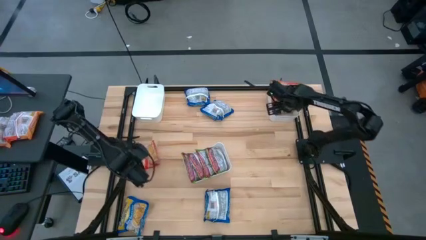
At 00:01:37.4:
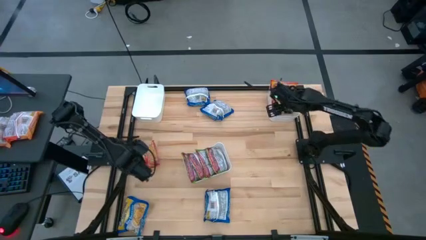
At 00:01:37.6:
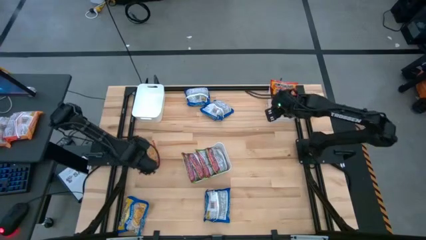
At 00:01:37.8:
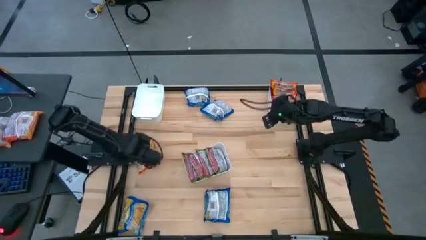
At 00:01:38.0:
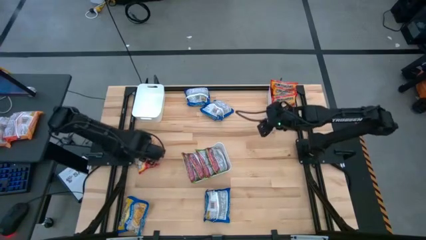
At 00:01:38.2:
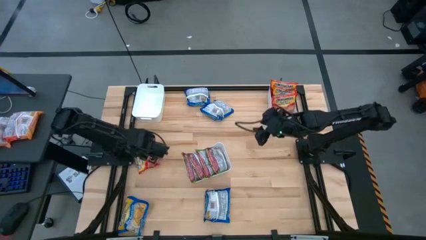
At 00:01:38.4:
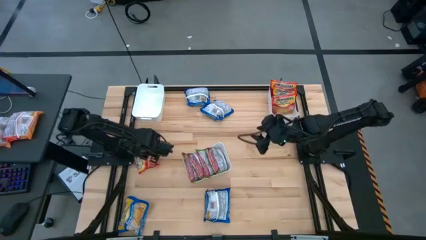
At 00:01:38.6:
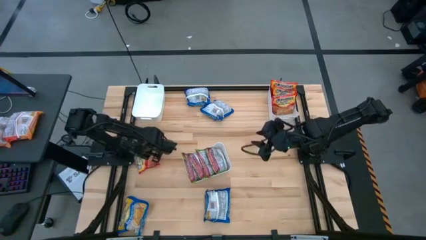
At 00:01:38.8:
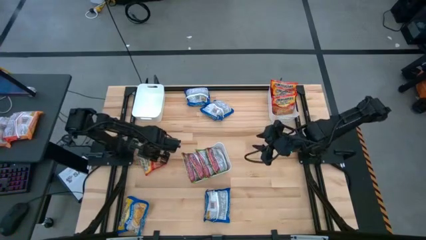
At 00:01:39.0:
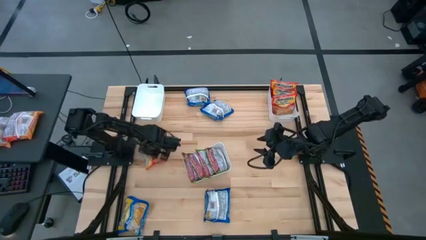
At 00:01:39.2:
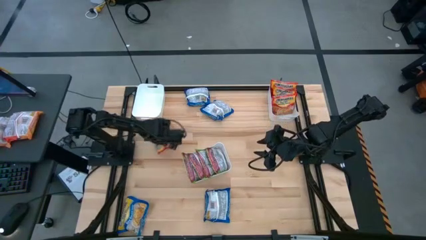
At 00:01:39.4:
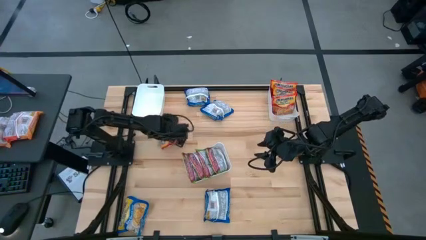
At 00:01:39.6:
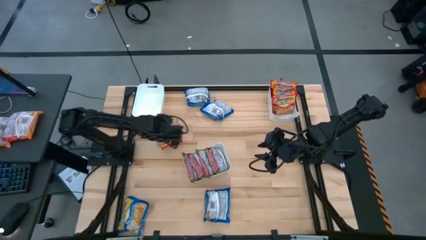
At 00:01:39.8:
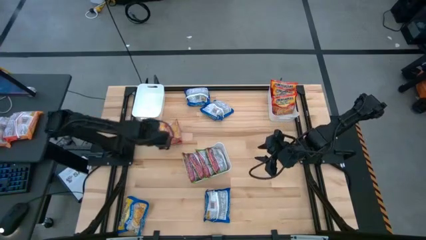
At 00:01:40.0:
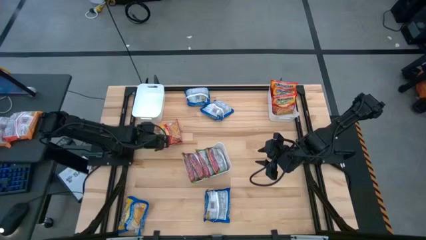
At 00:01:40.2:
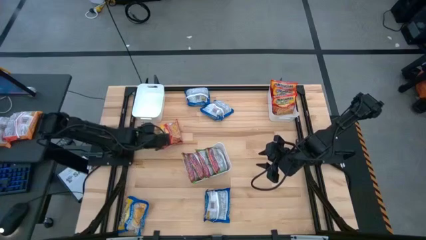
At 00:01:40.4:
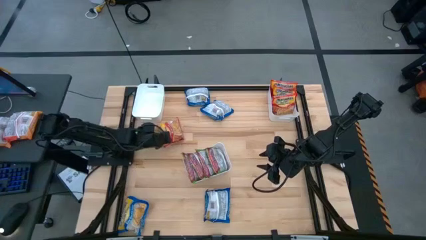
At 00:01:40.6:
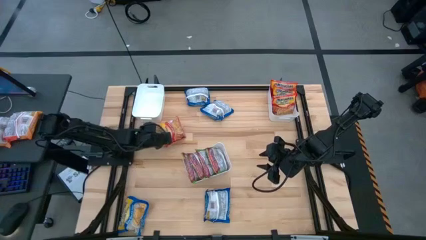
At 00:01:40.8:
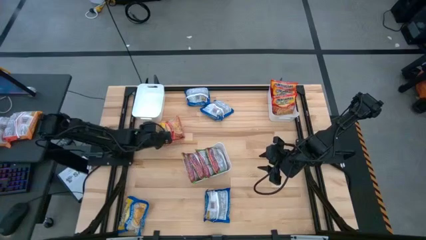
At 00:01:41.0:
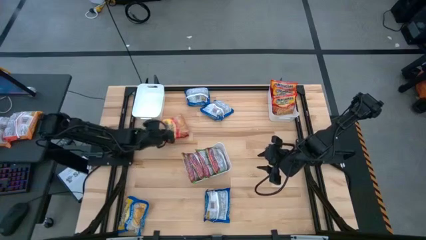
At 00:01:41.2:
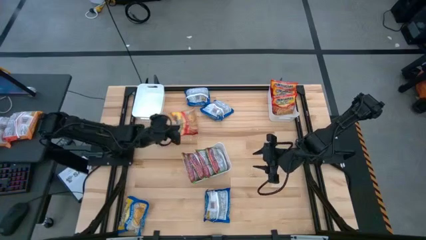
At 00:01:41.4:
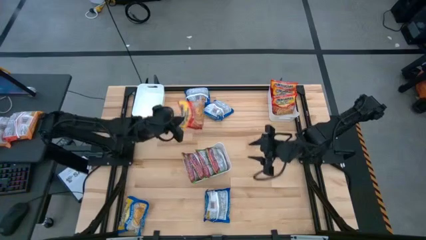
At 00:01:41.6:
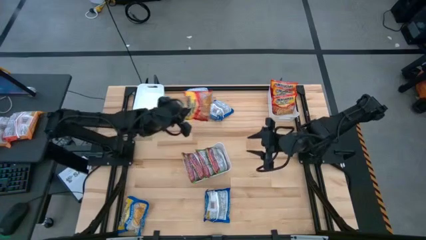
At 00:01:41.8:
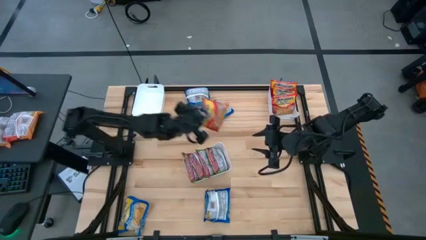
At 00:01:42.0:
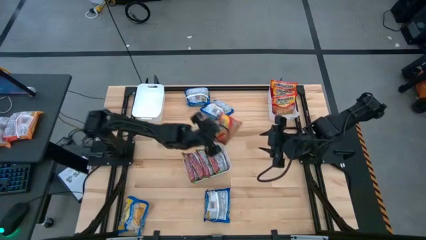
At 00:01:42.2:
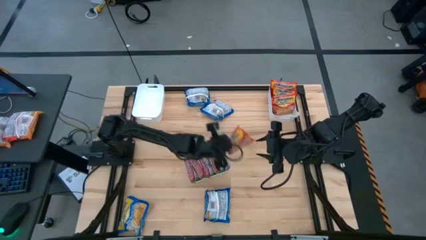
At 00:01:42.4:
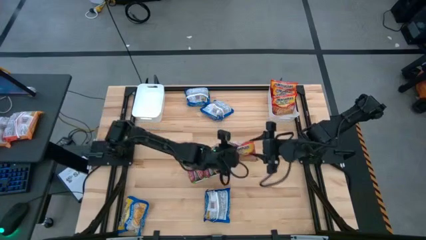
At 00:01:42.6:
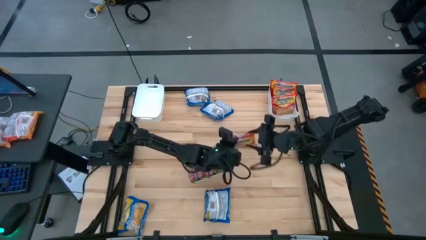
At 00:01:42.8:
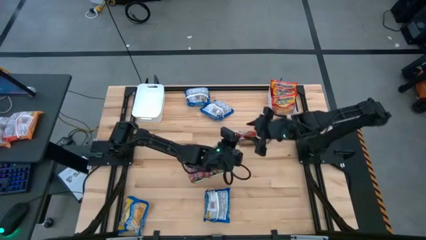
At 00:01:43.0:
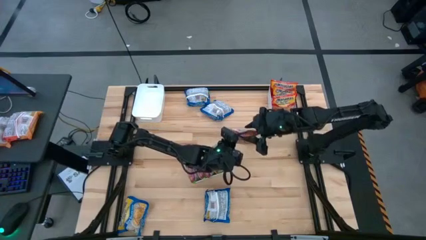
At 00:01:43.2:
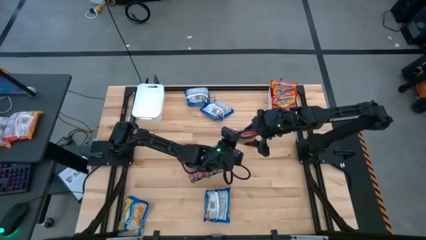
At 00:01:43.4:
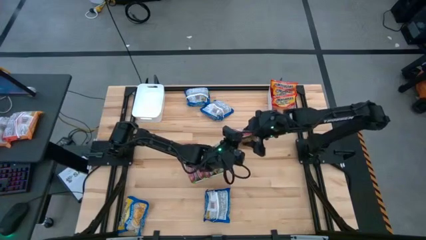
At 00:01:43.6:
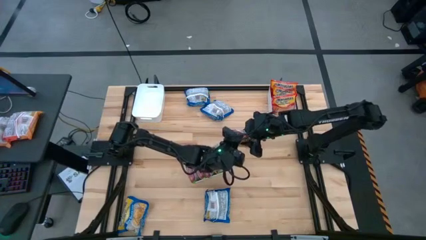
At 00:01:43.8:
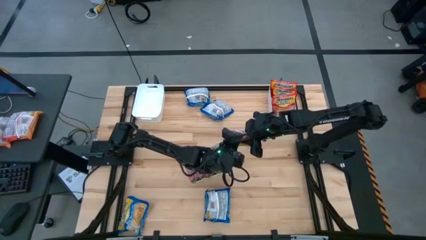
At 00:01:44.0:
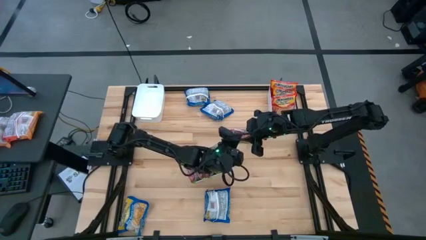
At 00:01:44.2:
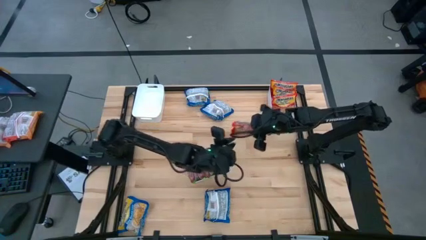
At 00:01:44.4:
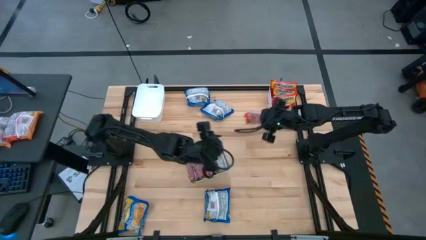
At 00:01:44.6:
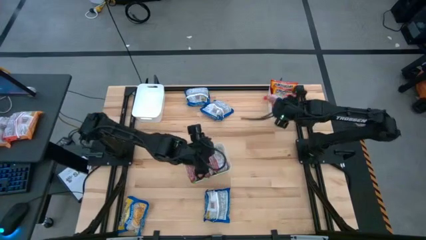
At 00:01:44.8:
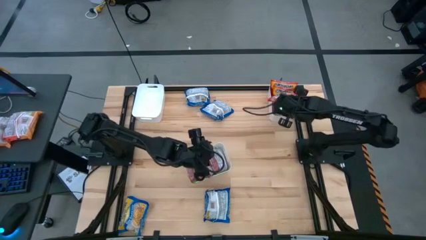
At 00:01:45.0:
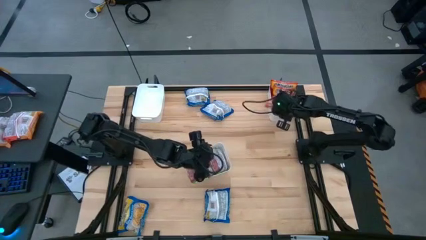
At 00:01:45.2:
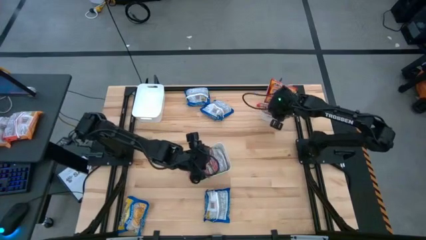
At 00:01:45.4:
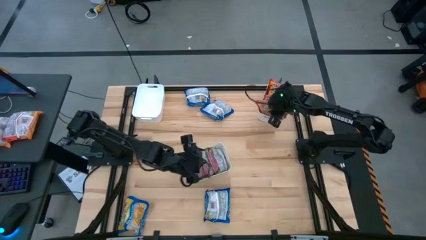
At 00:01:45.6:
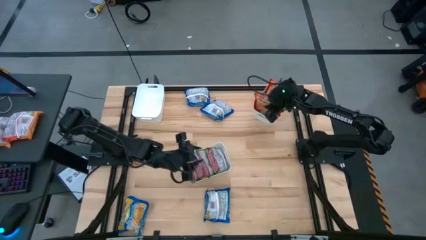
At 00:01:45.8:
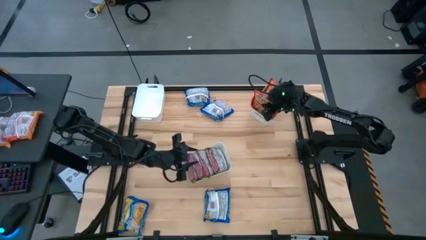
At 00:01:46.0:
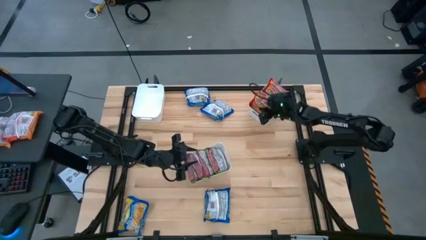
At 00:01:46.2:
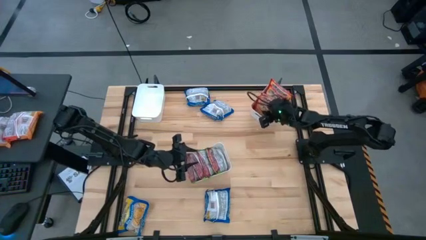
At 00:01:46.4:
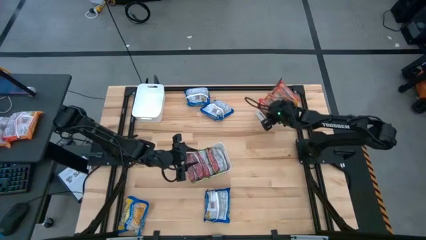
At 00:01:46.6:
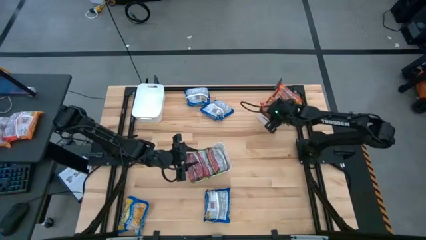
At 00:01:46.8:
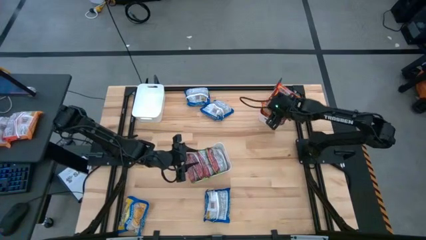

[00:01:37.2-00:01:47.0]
Task: Sort Maruchan noodles
Put the orange noodle pack into the top right white bin

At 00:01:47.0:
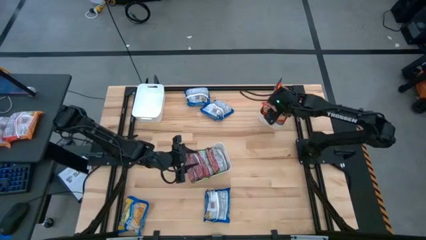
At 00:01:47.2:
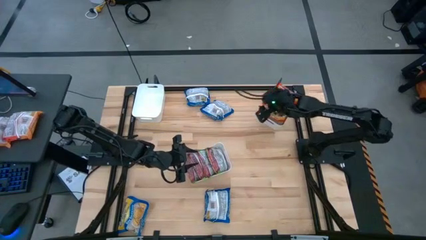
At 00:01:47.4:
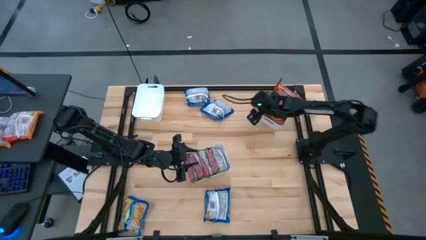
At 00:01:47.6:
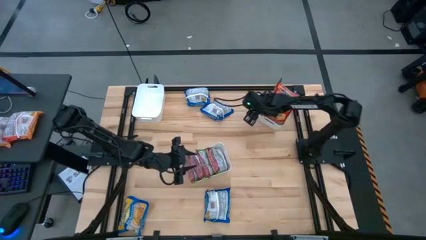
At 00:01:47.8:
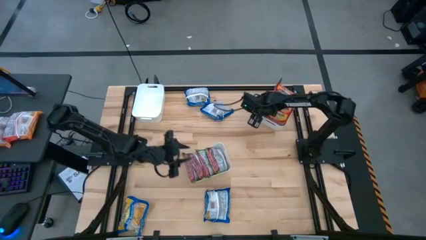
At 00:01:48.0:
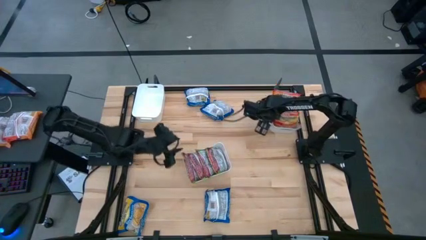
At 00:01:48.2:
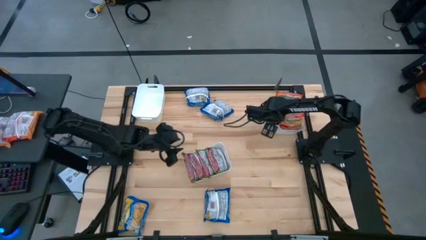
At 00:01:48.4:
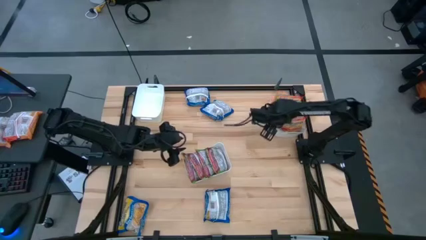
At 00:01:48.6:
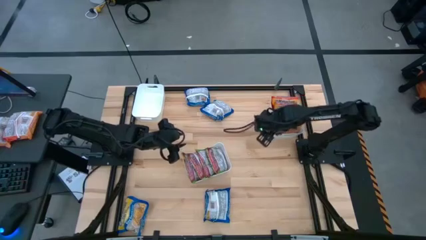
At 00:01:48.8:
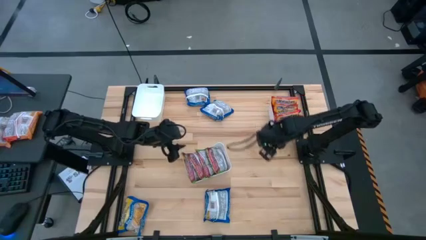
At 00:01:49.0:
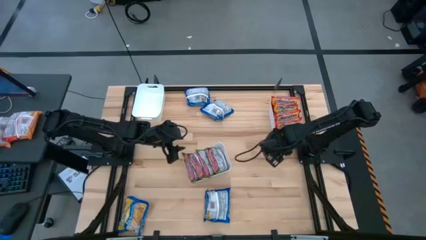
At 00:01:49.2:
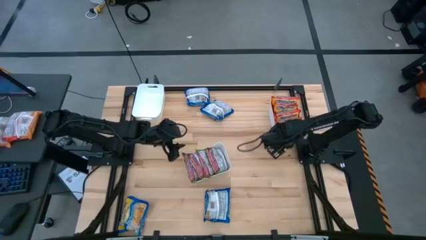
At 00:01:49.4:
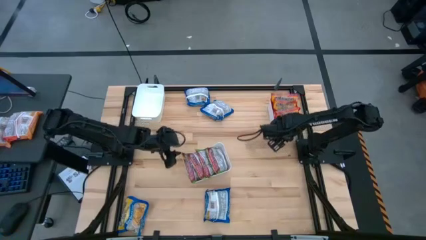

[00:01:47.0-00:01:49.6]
Adjust the top right white bin on the table

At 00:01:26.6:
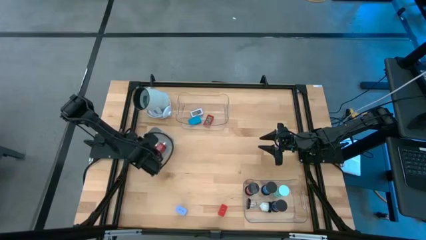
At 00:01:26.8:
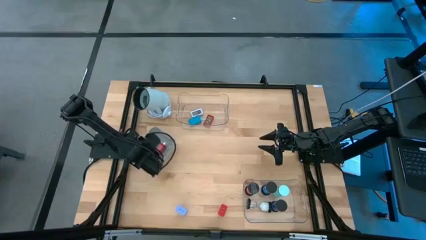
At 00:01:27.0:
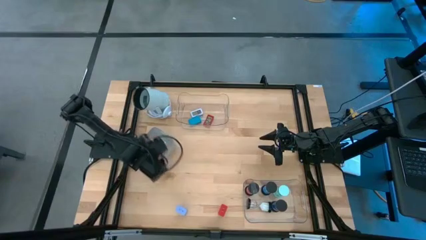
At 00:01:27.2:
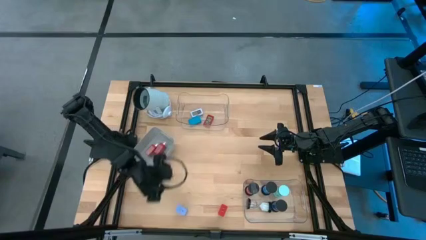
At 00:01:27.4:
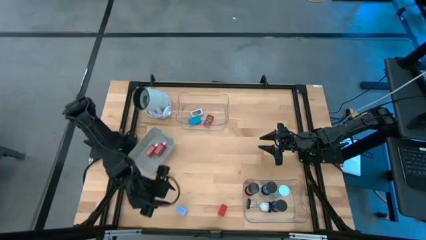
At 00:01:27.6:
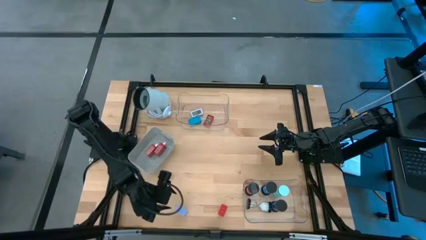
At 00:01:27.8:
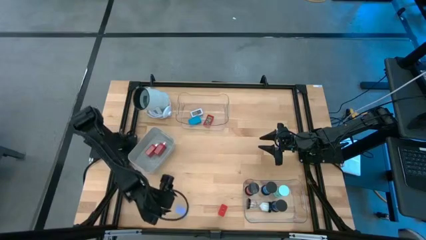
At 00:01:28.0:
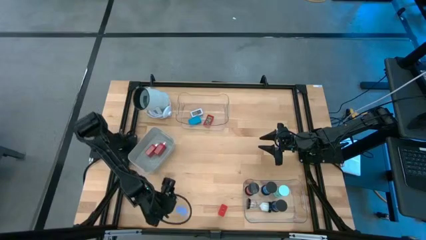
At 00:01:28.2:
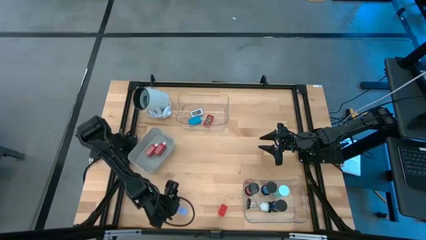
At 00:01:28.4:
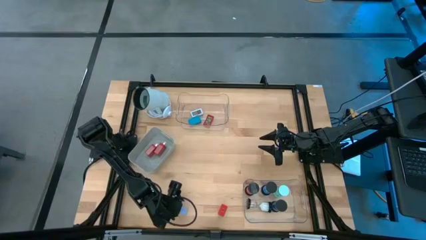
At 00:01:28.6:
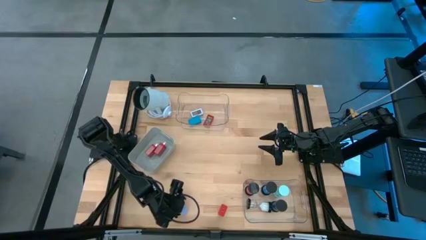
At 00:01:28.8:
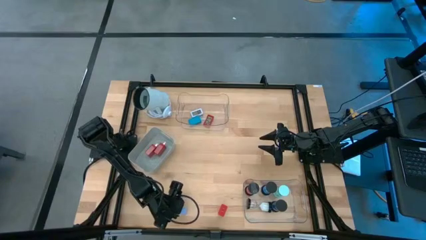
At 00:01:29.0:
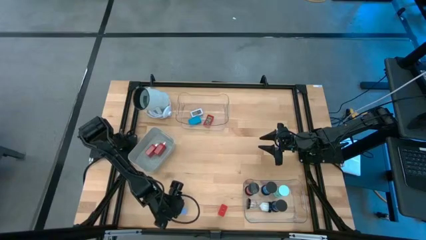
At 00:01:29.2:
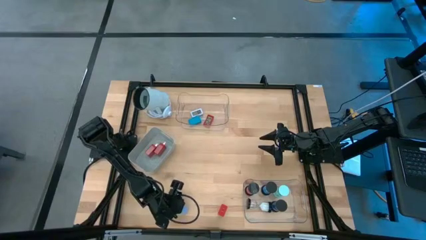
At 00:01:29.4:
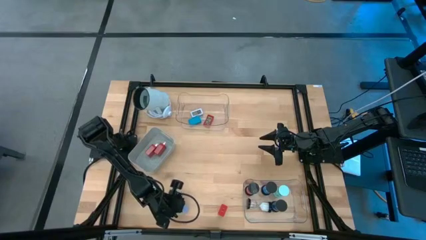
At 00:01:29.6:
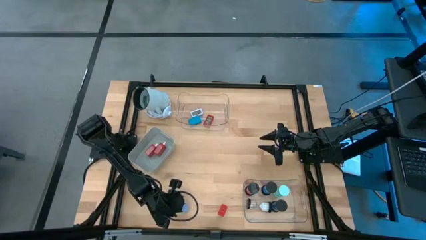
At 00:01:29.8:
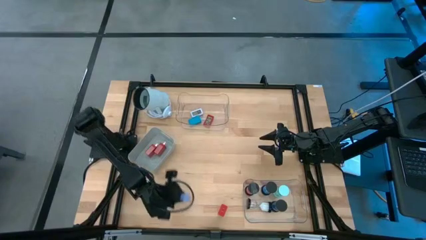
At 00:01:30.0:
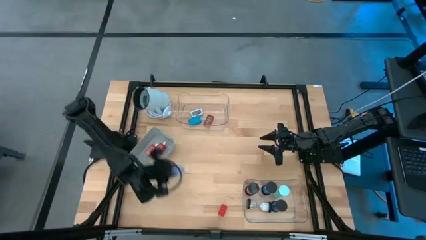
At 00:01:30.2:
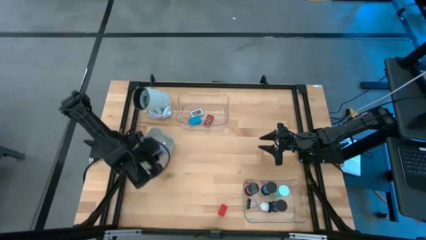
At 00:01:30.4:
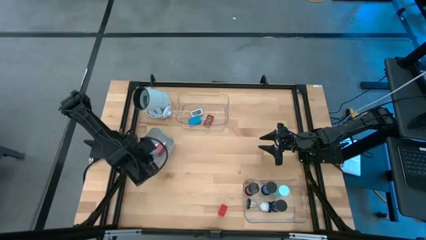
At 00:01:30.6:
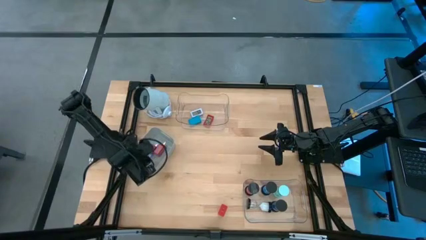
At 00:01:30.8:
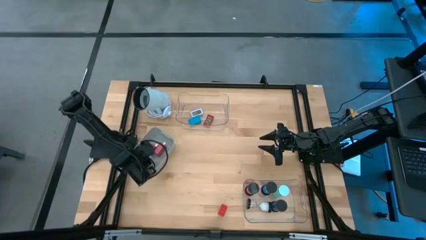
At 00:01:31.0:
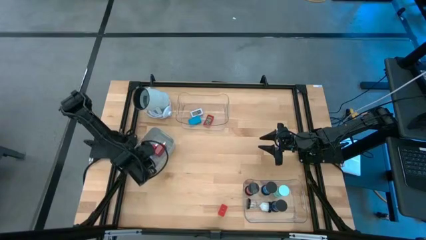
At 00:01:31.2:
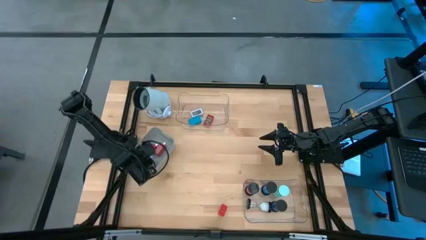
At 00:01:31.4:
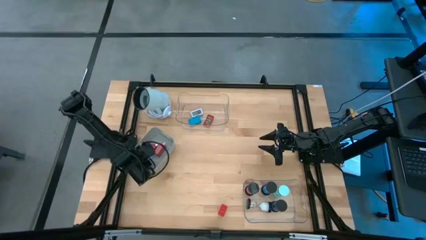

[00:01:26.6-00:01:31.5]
Task: Pick & Place Office items
Put the light blue charger adapter into the gray bin
